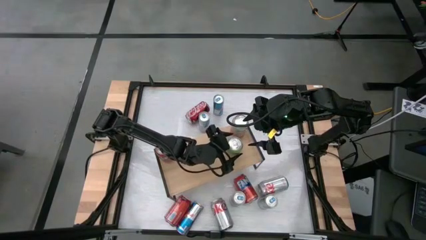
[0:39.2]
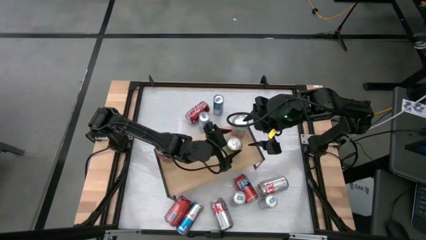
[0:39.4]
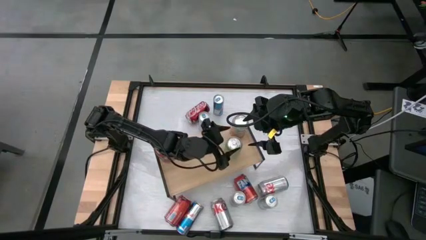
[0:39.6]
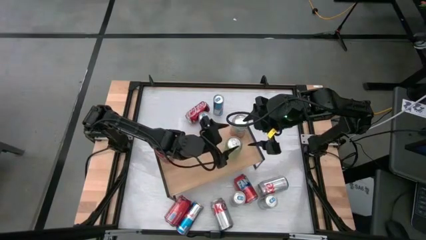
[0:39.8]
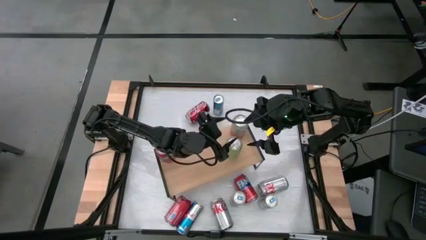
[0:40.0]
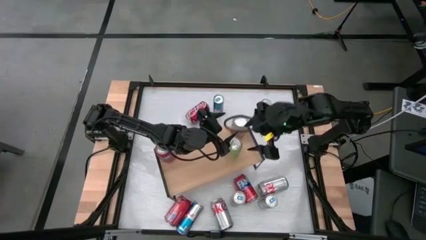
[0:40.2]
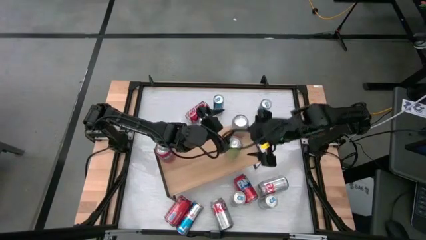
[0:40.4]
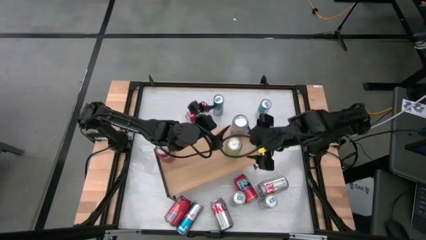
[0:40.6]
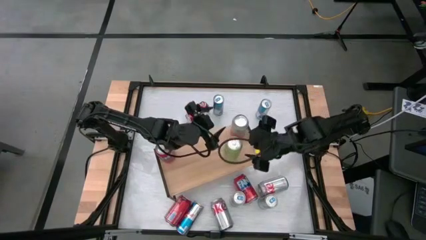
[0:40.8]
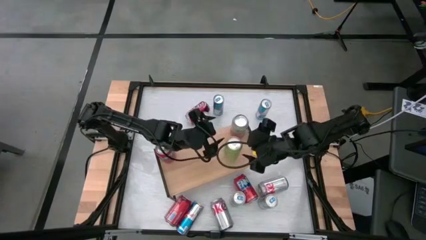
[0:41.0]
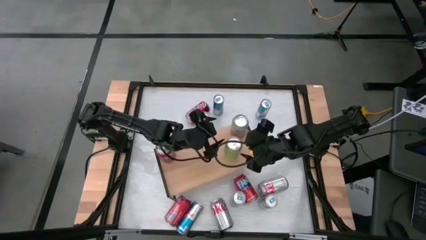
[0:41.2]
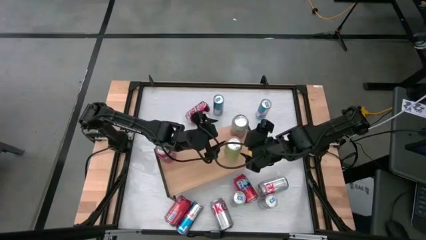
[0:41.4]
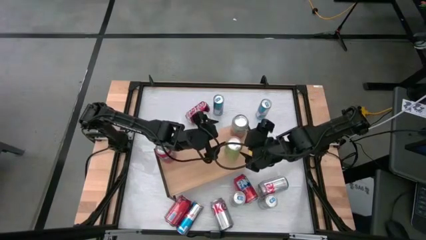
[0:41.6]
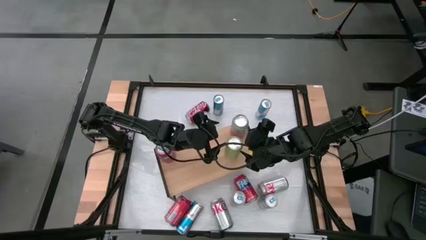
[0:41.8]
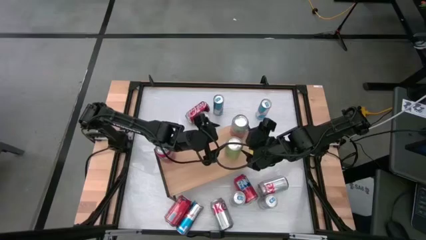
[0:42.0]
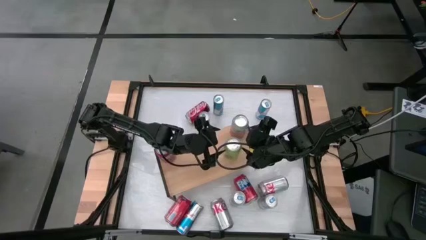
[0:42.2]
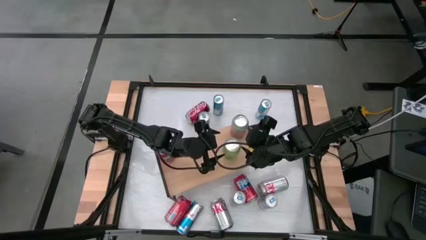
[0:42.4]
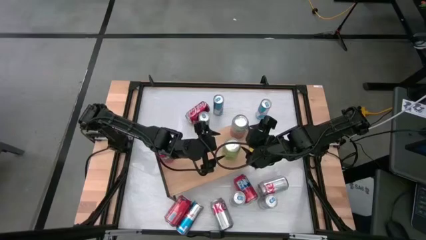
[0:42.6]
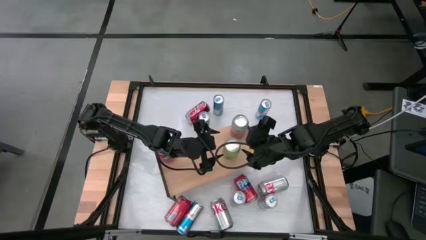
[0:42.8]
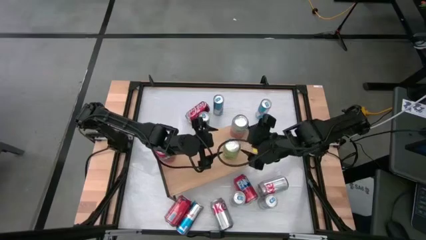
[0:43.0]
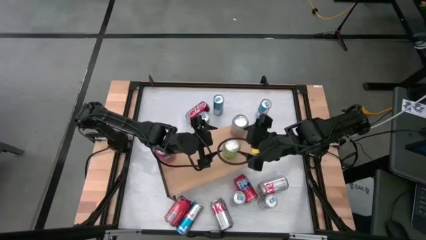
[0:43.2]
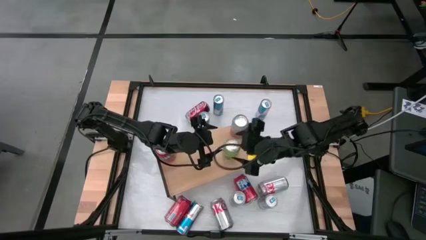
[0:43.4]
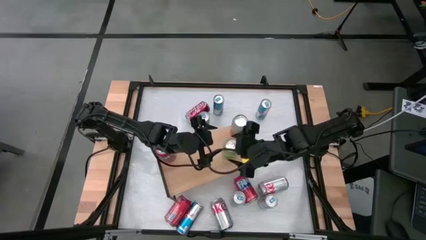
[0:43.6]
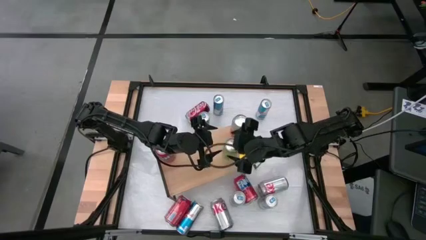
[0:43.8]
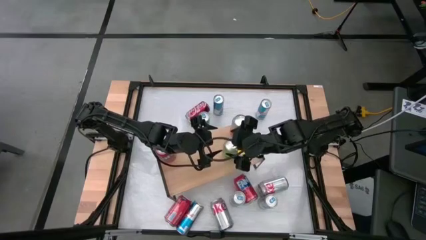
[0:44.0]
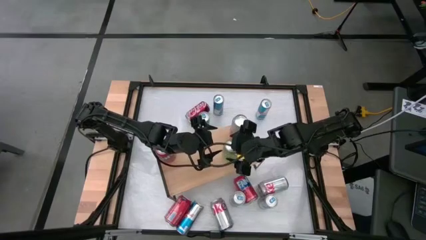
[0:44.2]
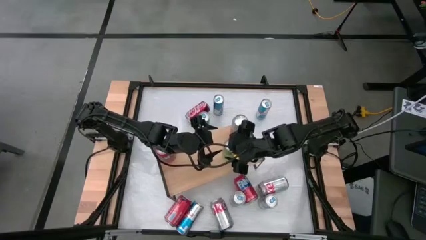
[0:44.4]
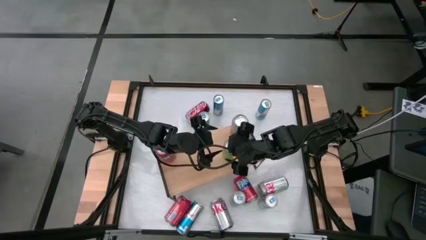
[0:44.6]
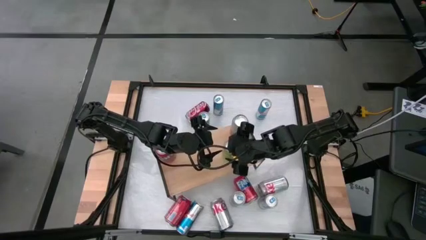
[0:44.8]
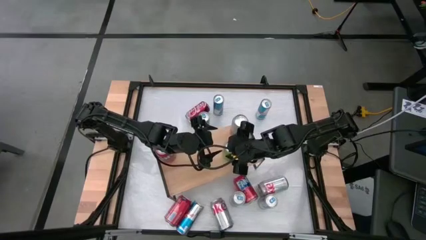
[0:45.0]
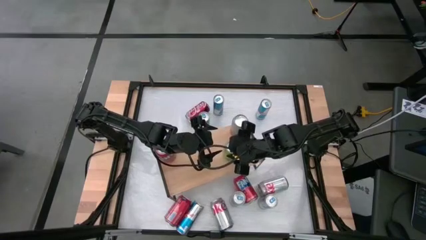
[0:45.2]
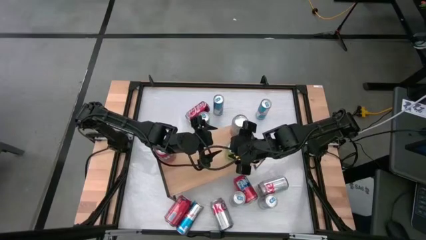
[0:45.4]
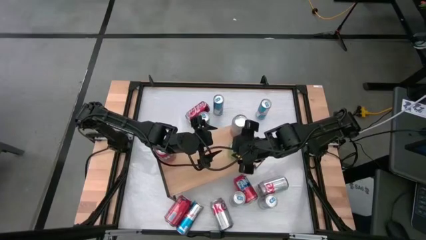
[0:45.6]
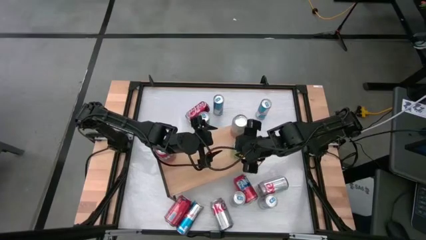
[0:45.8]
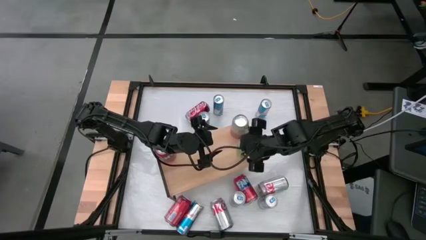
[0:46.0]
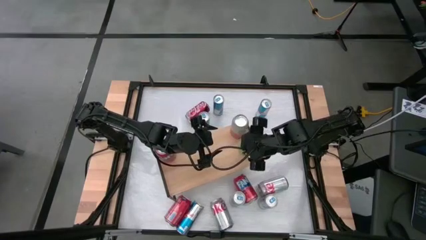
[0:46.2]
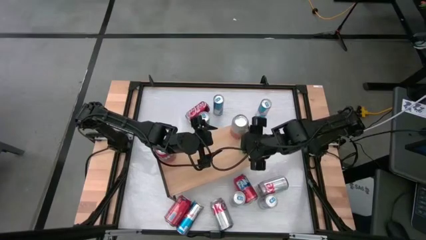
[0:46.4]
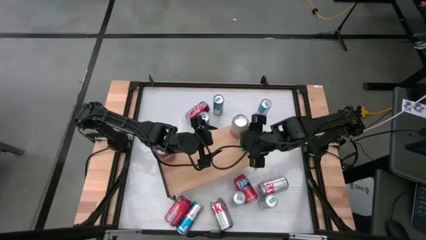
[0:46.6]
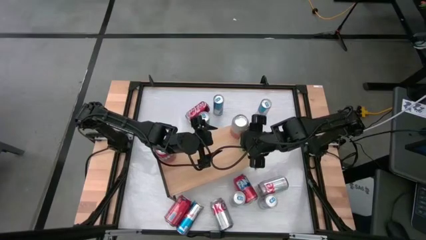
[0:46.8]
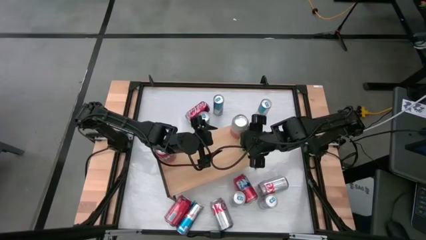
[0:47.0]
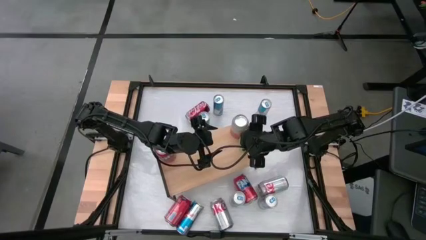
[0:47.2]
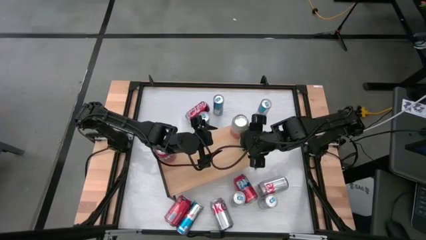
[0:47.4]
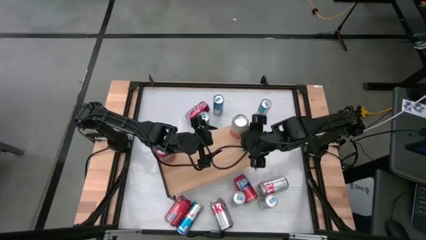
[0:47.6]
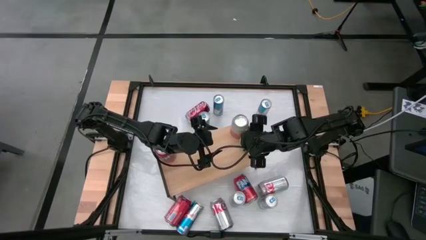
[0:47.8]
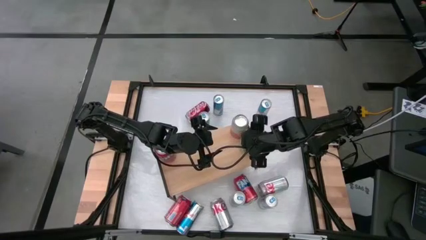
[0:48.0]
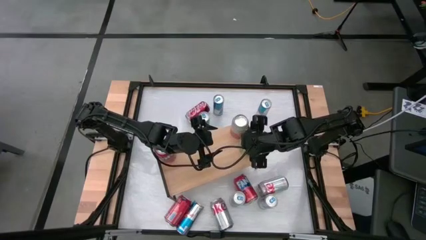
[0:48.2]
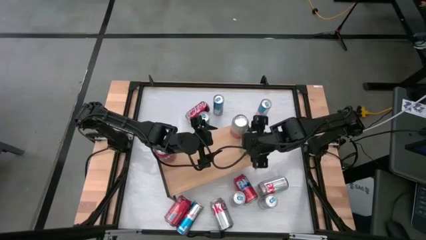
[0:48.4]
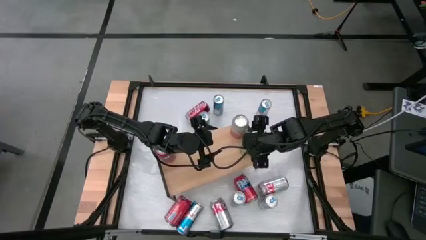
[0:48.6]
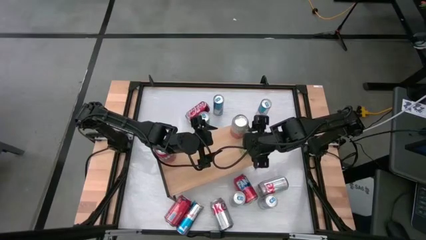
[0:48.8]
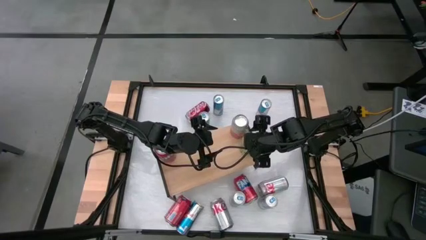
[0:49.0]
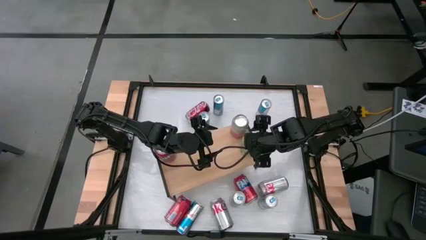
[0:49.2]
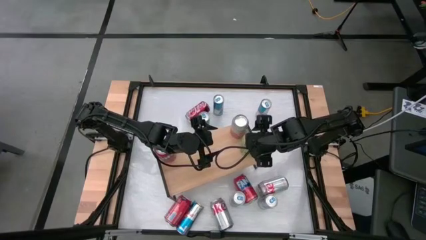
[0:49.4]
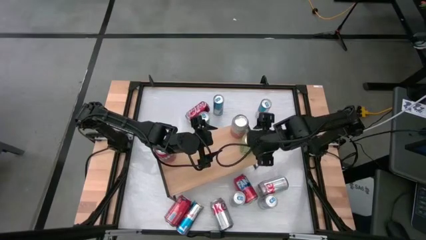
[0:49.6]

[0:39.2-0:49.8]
Task: Place canned beverage on shelf
Put the light green soda can

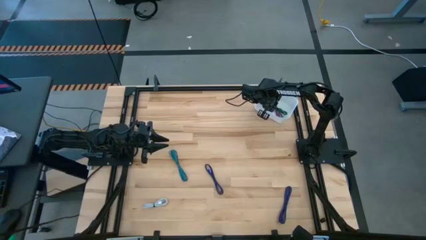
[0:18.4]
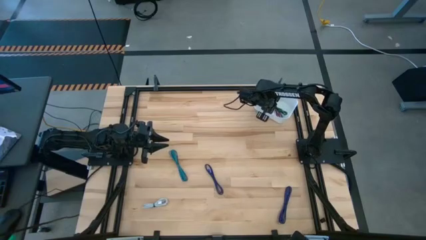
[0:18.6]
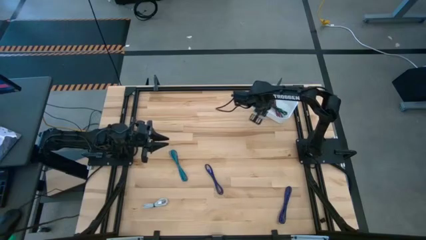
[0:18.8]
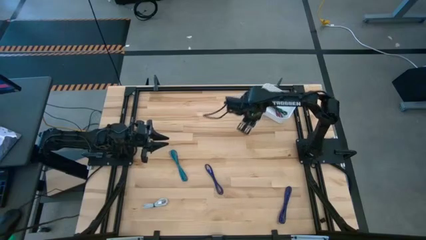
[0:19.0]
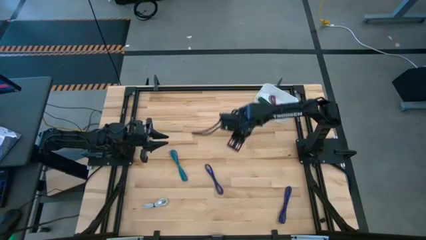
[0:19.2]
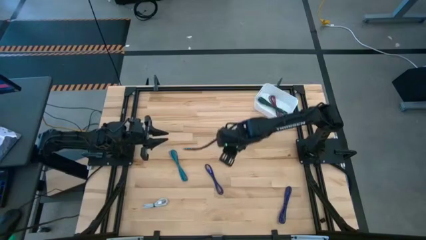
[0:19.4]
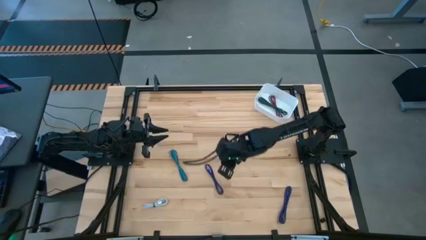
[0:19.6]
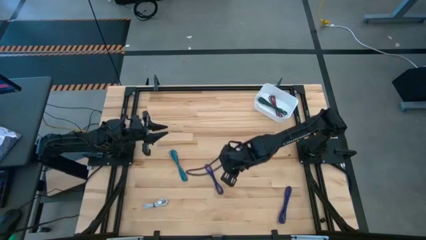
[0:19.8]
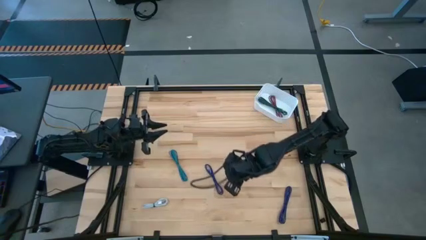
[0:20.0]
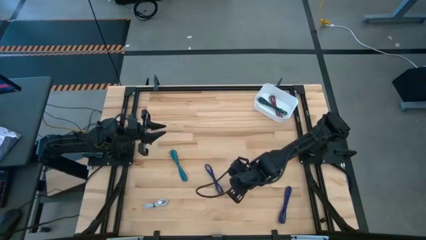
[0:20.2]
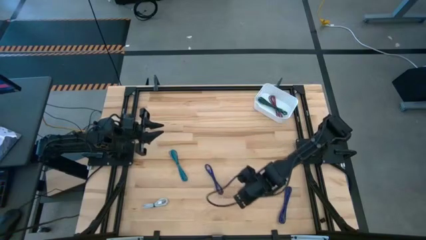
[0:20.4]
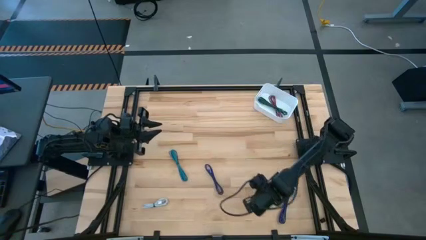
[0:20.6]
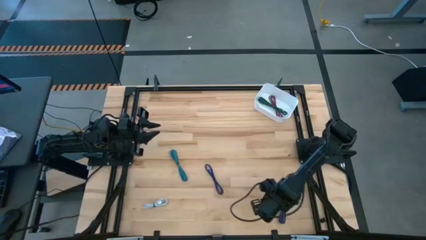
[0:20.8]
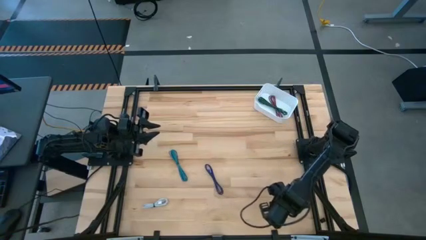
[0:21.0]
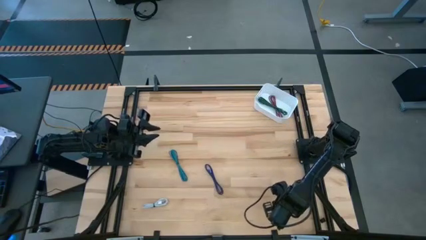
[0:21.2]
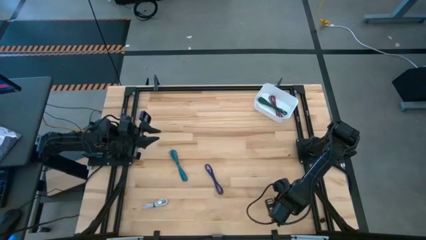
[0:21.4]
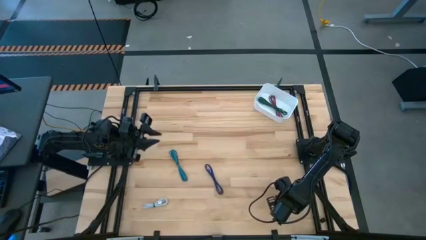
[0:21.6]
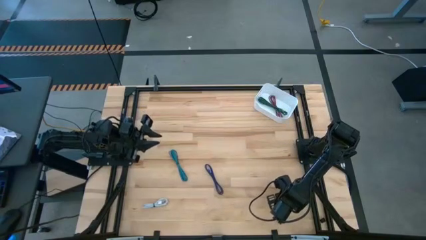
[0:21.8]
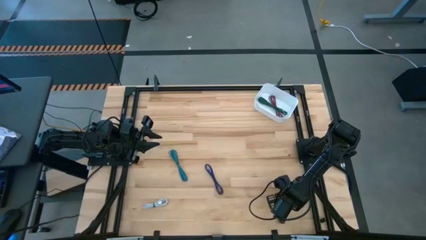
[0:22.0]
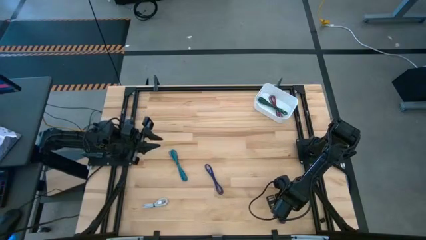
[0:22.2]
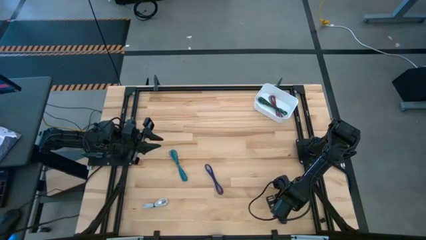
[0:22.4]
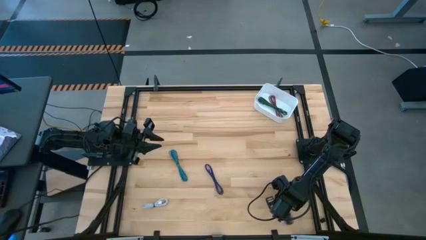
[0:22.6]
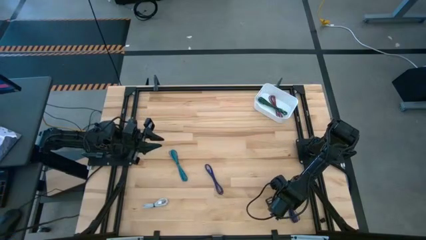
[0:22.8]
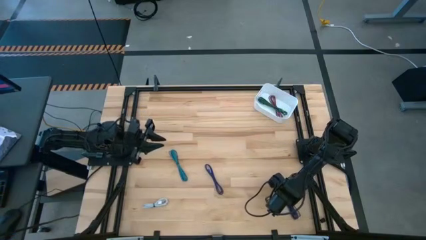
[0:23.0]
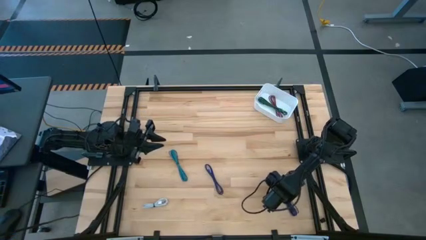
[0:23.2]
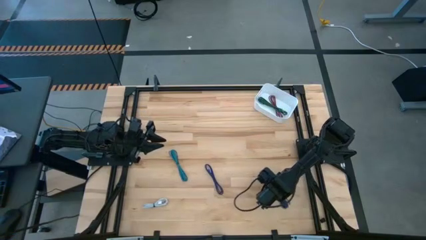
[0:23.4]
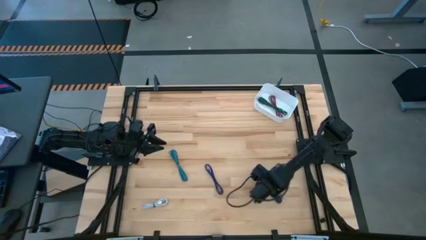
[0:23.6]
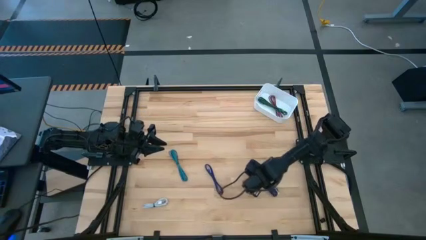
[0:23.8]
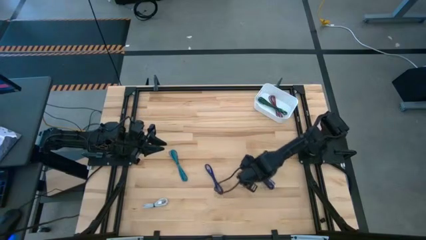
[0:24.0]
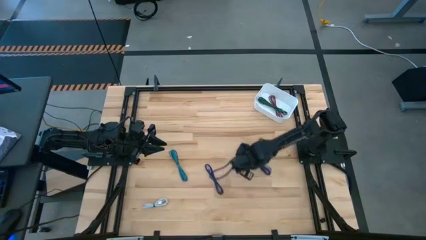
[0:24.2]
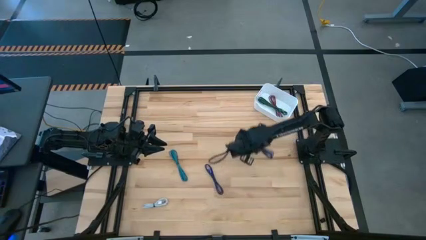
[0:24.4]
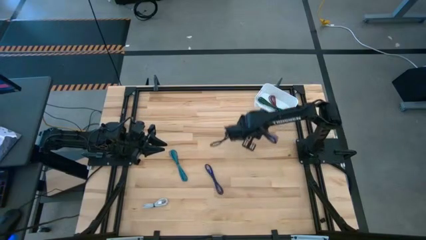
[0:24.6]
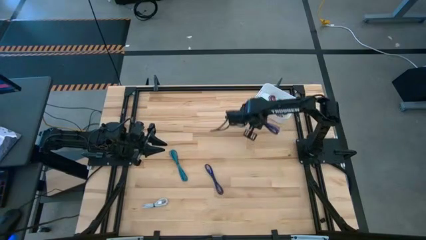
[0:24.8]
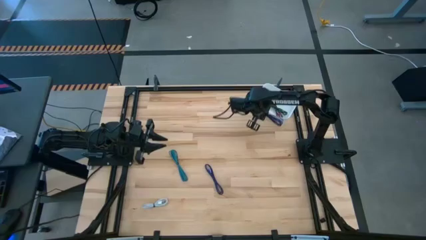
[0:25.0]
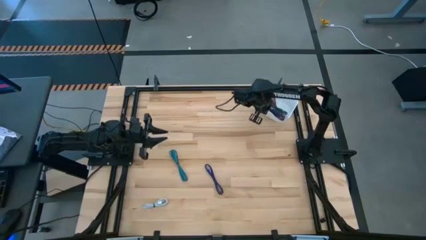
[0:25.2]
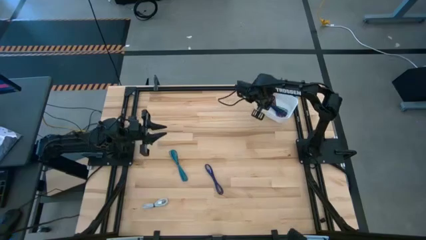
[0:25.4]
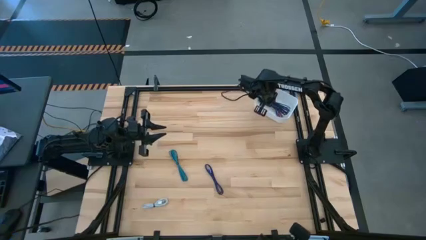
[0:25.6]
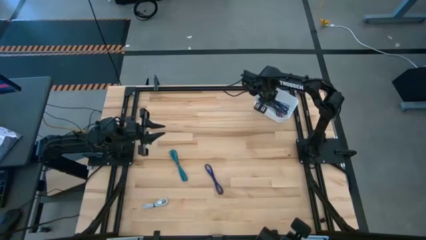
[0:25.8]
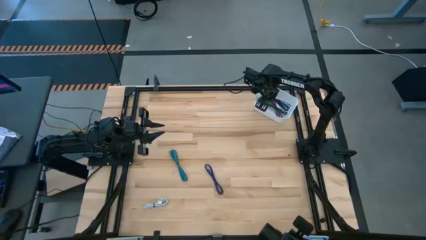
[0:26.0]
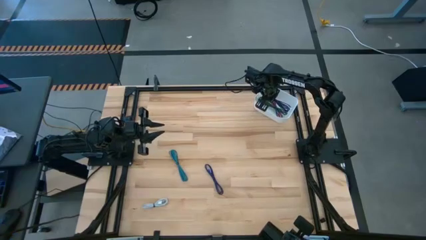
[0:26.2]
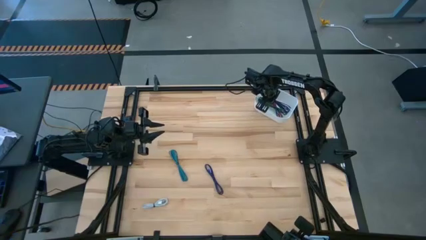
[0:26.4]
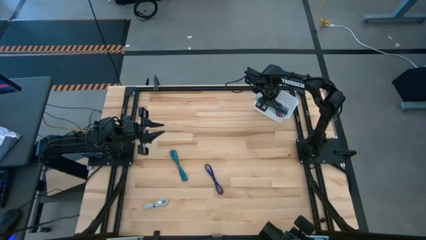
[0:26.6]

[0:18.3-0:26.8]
Task: Pick and place USB-C Cables
Put the blue charger cable into the white bin
